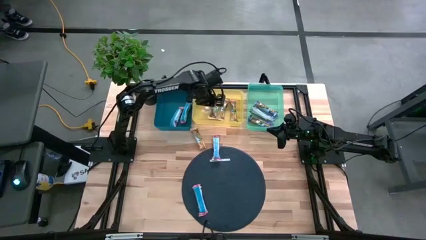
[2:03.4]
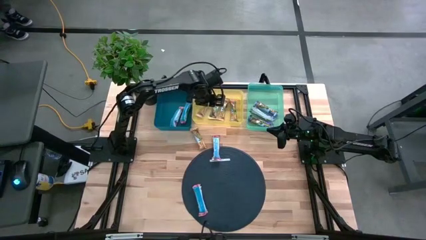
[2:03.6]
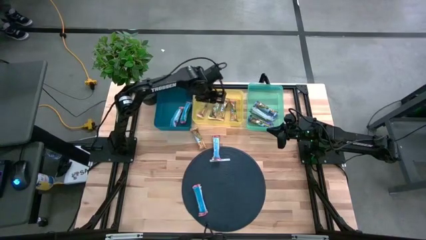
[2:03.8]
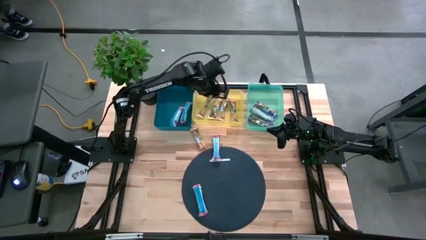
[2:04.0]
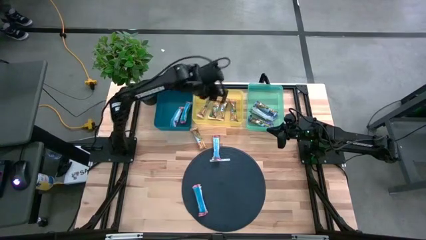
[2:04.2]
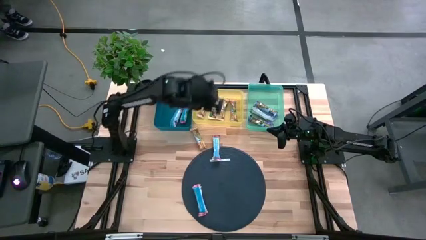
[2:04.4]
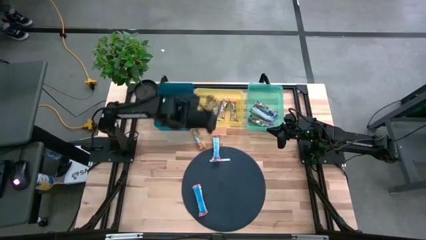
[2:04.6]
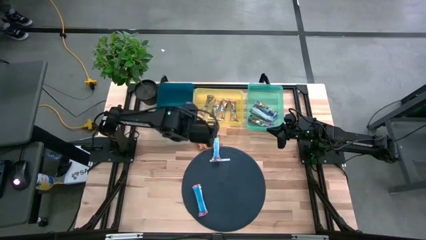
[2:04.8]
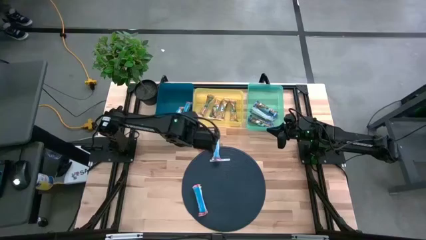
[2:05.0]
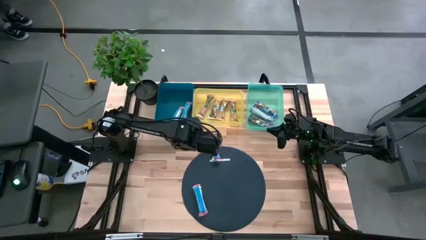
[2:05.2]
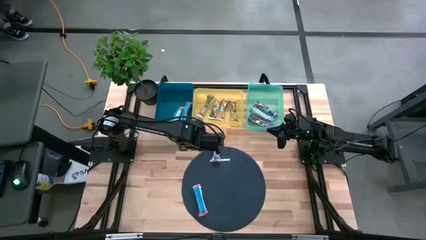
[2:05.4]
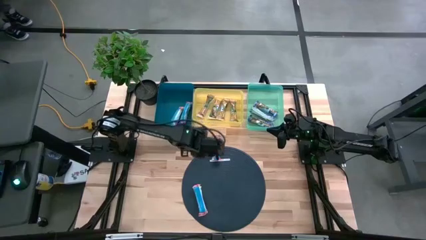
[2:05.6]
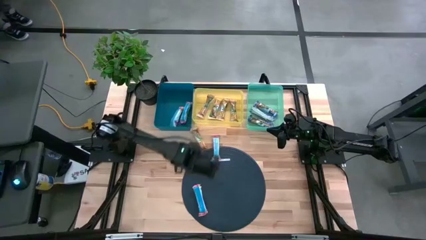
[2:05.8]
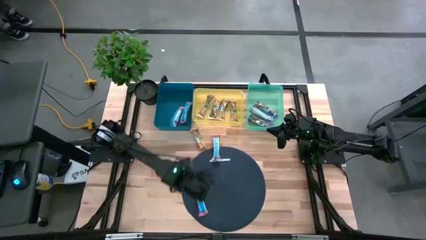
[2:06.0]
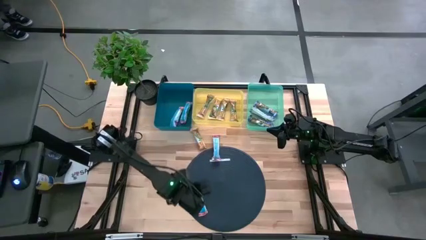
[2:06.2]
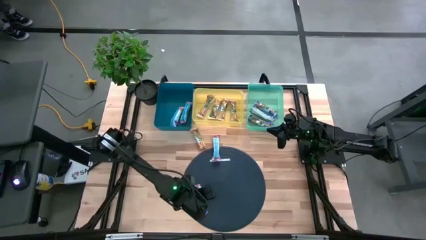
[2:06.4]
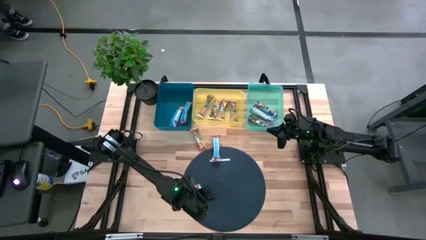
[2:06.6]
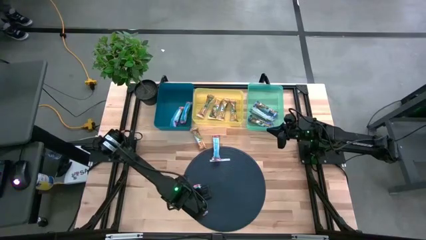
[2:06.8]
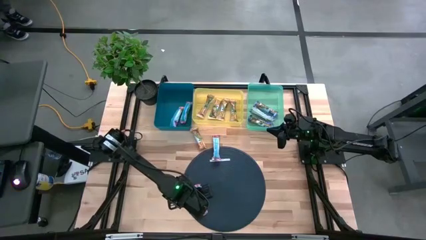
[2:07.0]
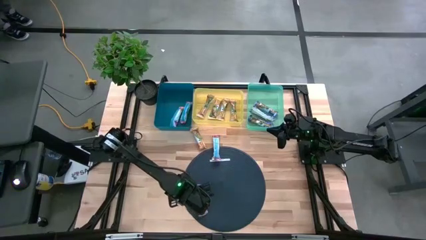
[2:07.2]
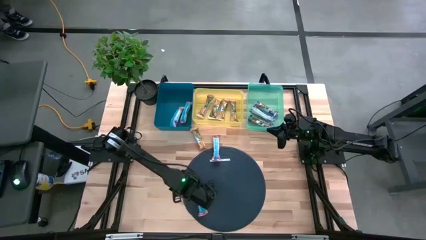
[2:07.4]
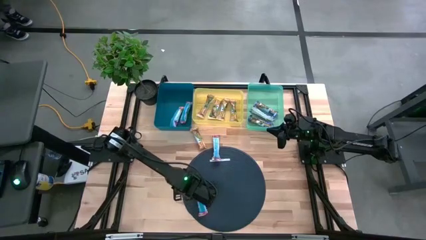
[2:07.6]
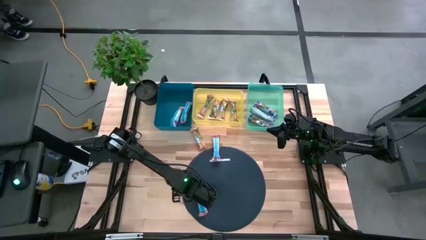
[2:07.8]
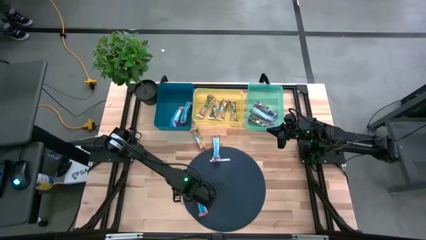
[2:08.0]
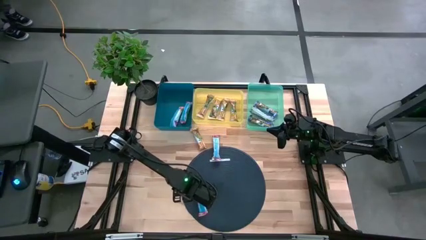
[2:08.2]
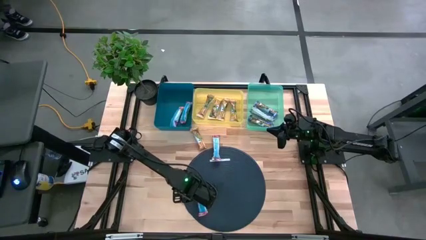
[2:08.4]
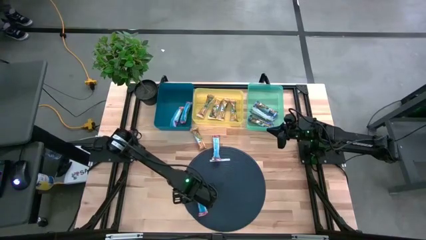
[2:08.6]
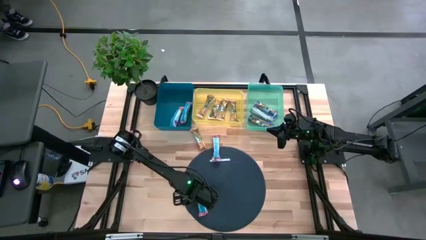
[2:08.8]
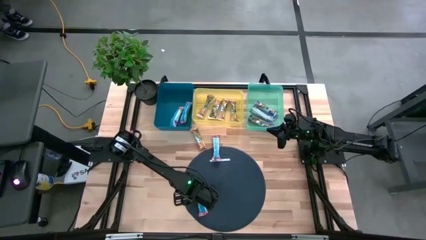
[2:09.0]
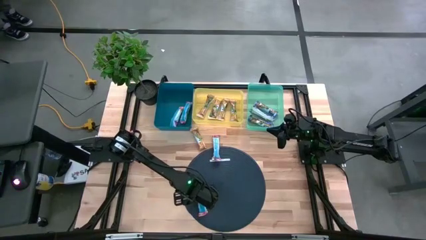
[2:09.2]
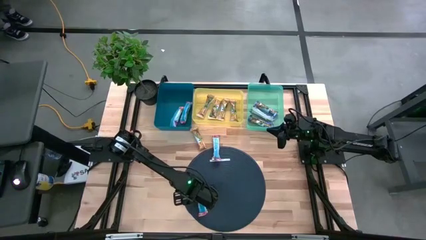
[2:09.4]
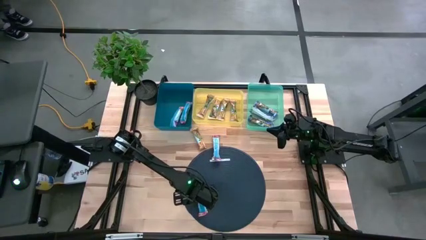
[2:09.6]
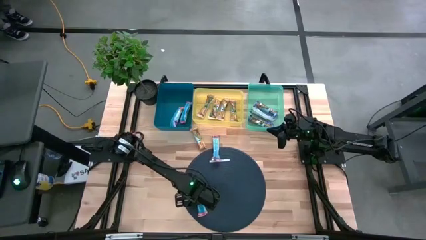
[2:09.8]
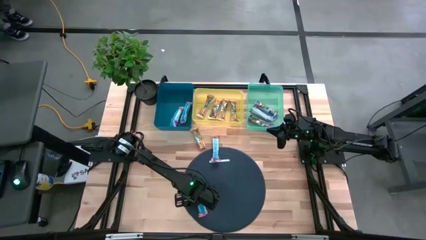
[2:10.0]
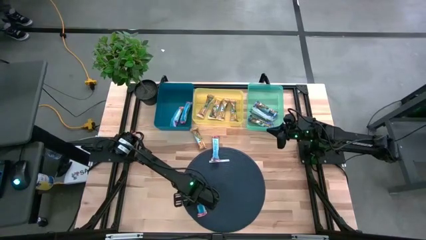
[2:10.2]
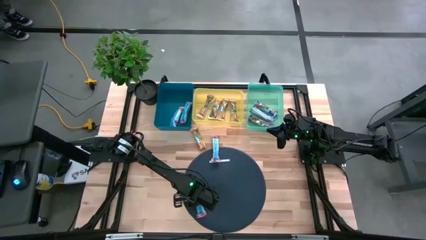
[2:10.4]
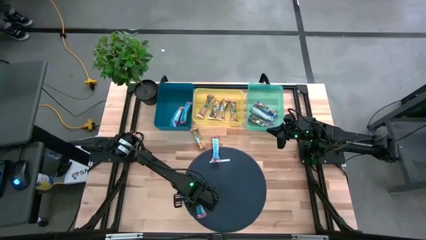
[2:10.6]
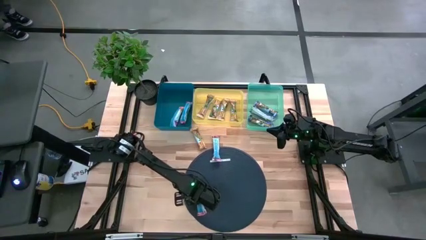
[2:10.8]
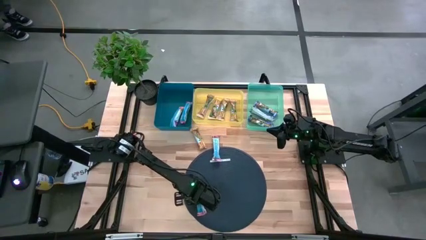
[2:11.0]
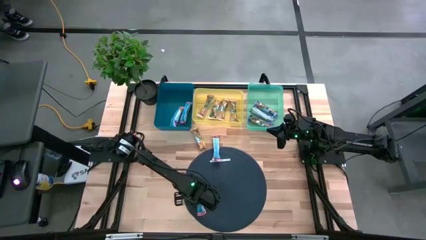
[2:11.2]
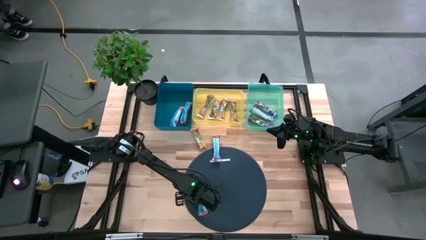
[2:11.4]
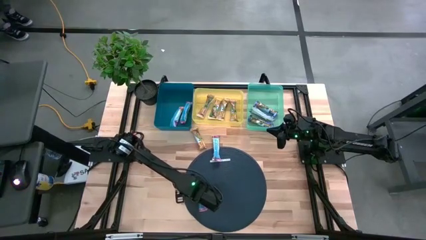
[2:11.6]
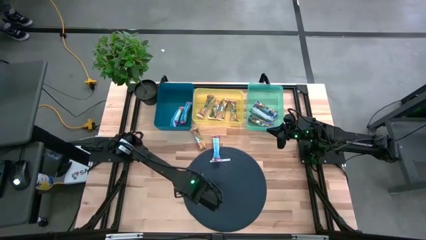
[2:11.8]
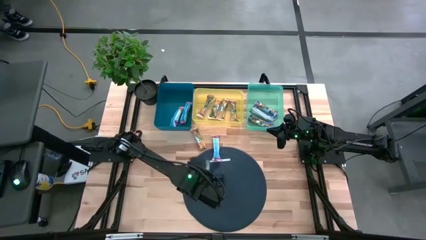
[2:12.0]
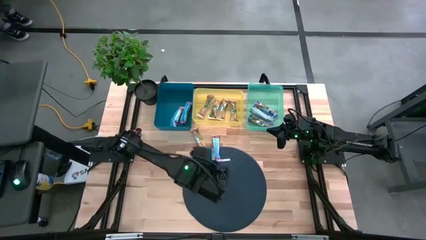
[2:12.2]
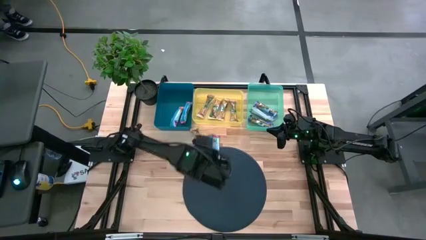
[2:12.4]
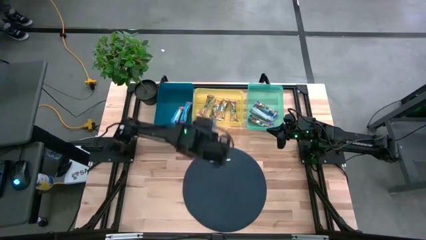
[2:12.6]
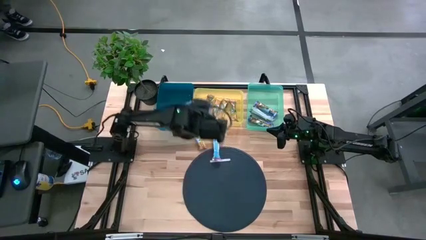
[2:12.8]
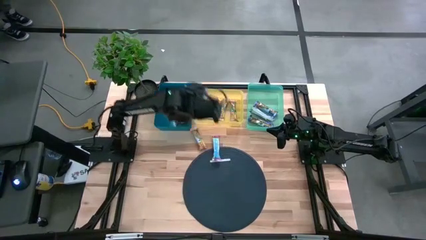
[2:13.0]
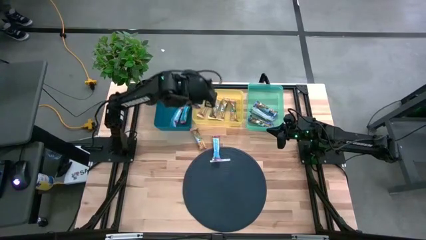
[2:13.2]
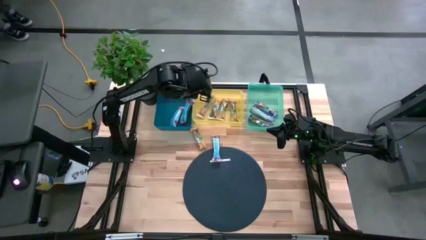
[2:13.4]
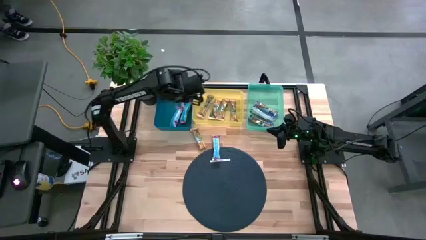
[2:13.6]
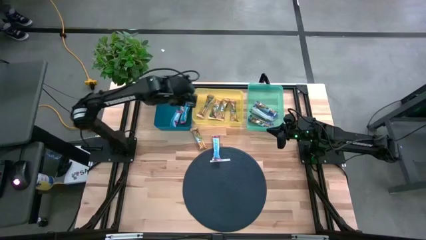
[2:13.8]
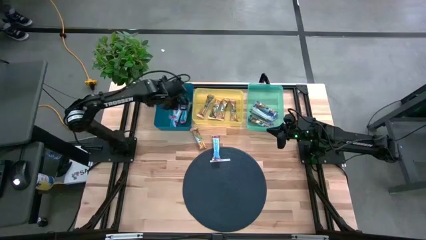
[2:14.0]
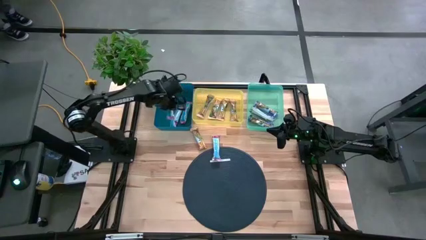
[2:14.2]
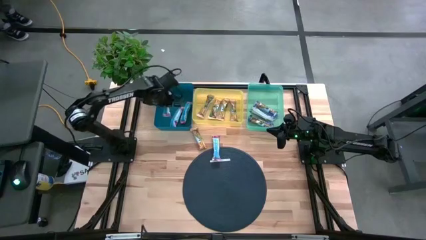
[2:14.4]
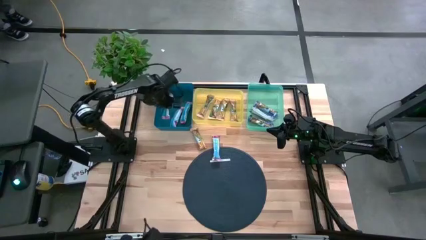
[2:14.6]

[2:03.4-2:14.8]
Task: Pick and place Granola Bars by type
Put the red granola bar into the blue bin

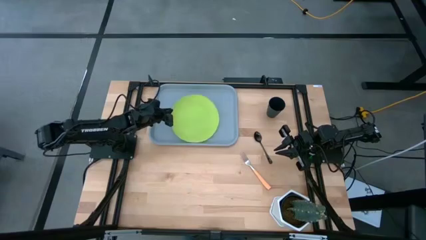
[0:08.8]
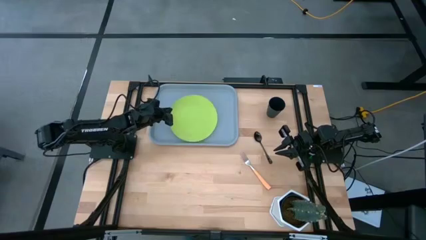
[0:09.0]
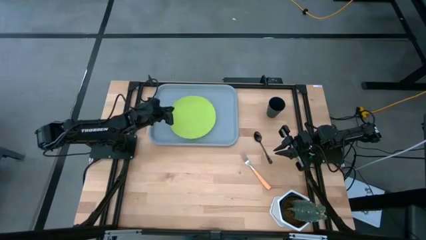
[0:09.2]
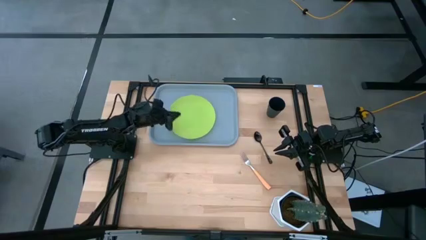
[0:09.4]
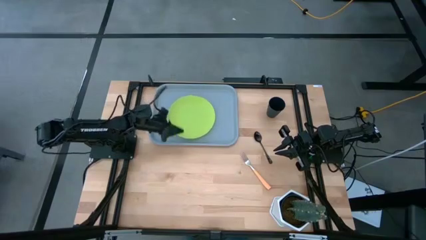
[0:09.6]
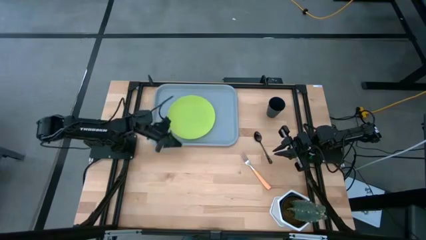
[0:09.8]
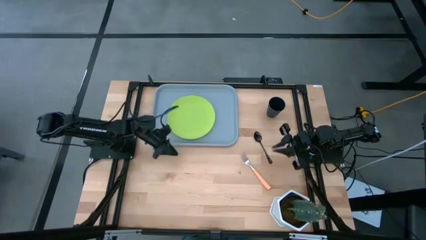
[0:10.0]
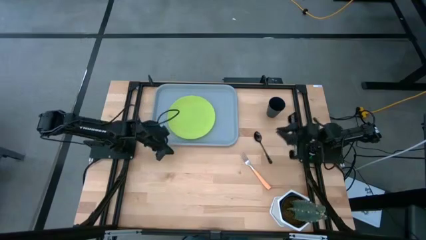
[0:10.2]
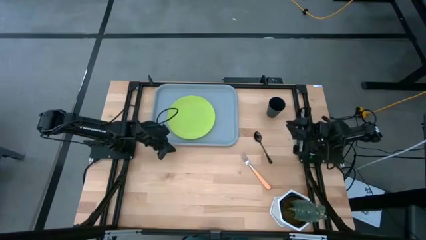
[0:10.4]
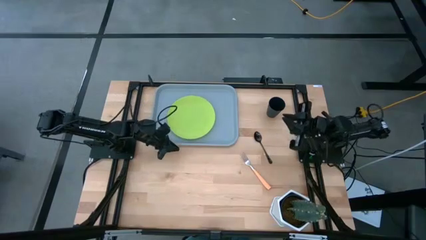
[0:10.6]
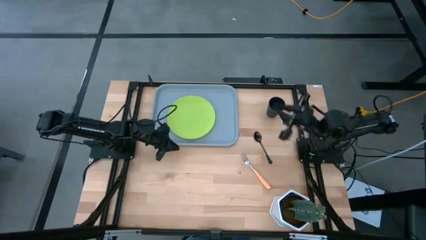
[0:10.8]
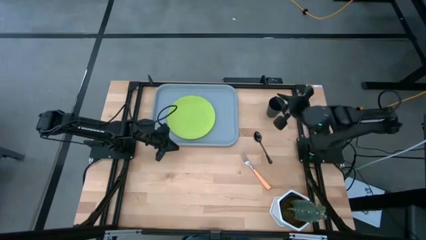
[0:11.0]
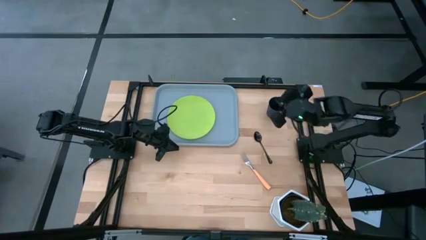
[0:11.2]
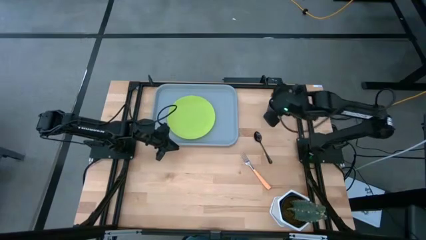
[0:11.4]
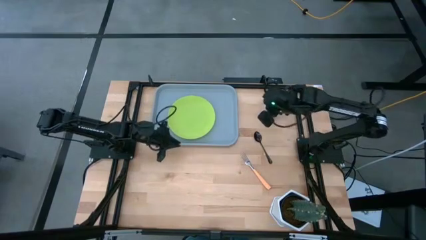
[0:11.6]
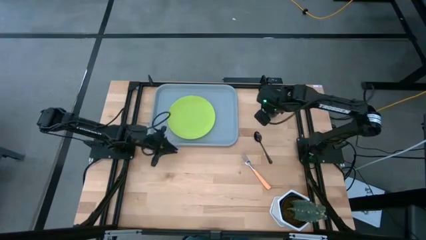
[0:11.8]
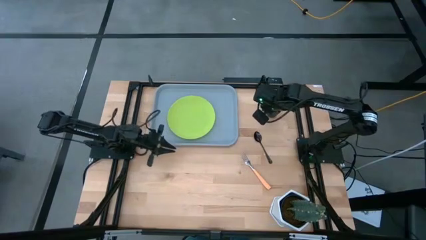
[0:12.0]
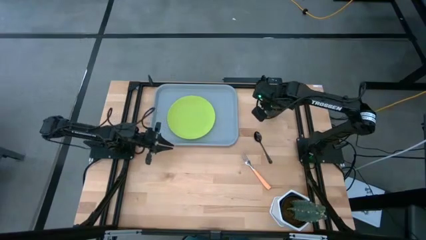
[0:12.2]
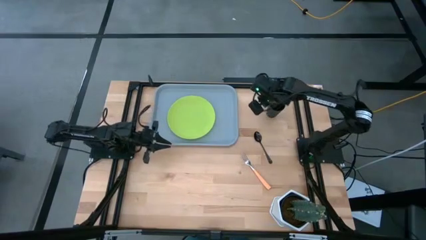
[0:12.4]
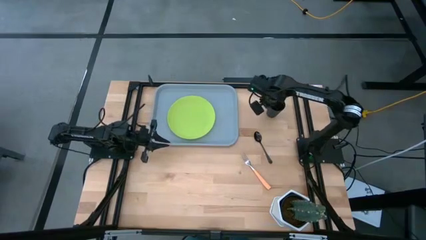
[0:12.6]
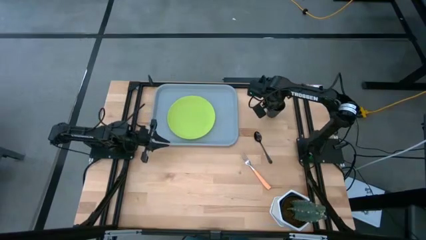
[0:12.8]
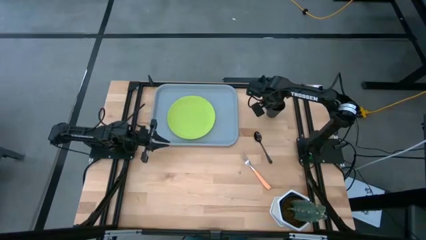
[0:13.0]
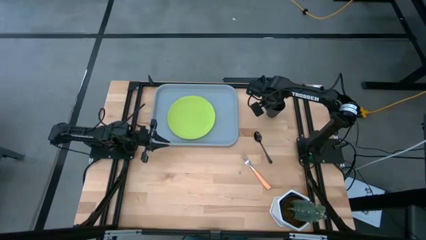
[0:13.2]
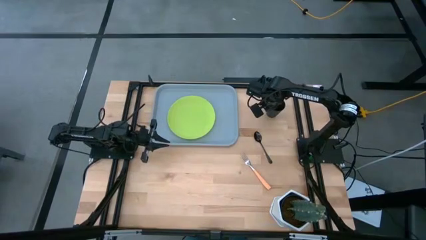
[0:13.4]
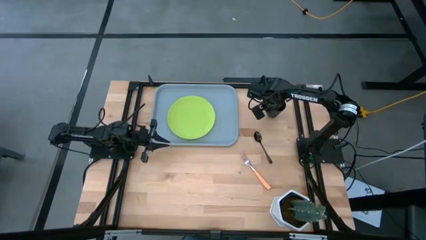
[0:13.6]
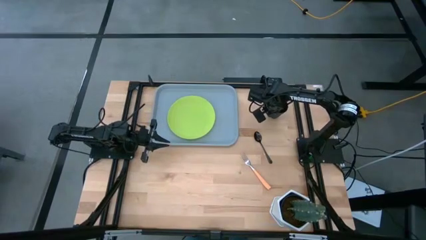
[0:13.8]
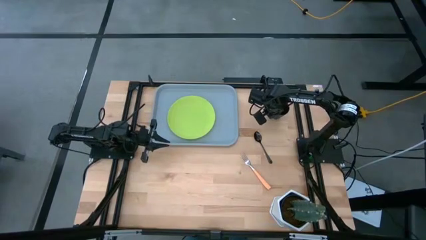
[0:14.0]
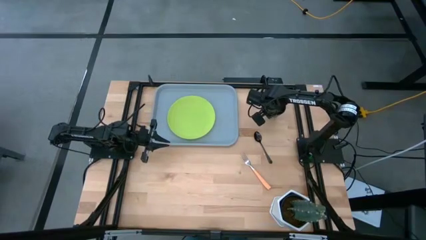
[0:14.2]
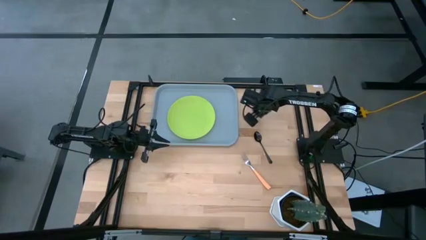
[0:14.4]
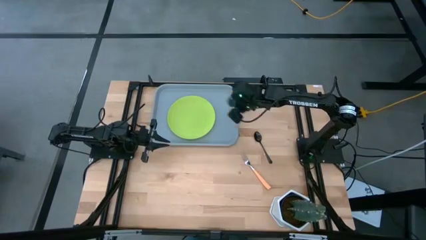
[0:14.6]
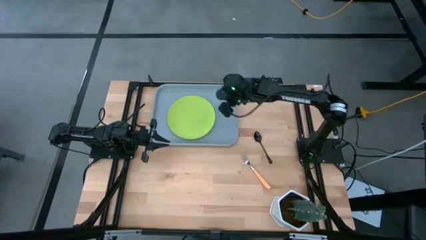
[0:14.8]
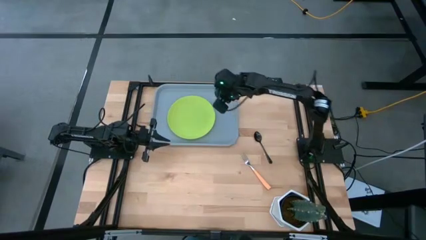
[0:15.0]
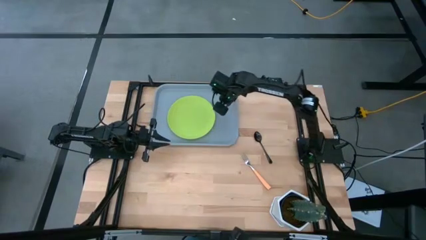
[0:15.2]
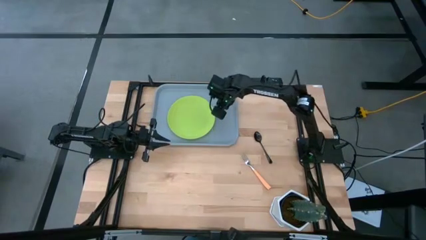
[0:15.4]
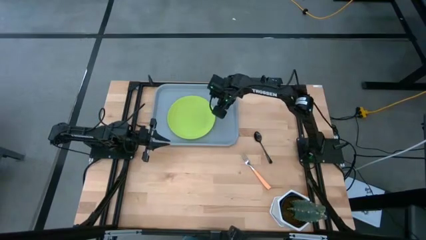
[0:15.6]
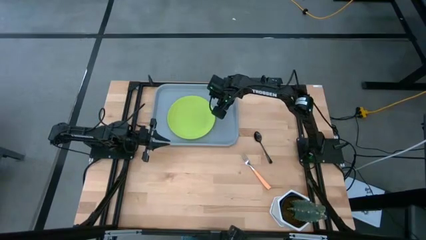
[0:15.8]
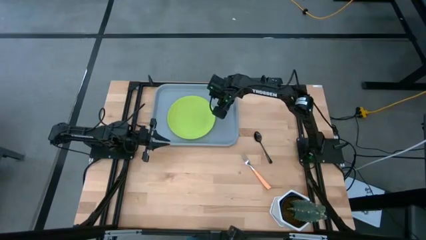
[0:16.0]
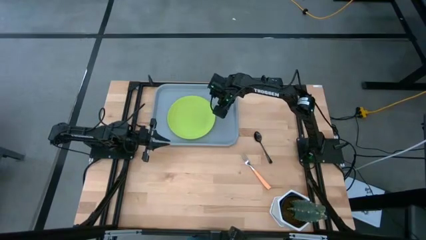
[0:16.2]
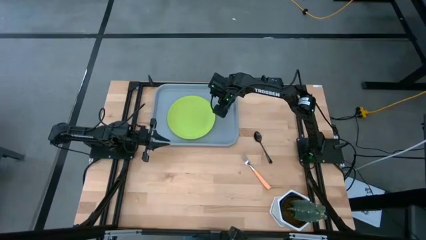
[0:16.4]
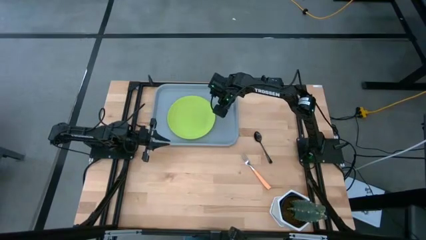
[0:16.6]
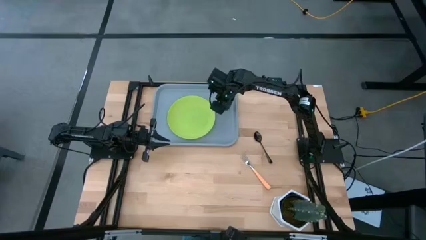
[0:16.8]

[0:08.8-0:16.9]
Task: Pick and place plate/cup/fork/spoon on tray
Put the black cup on the gray tray to the top right of the light green plate
